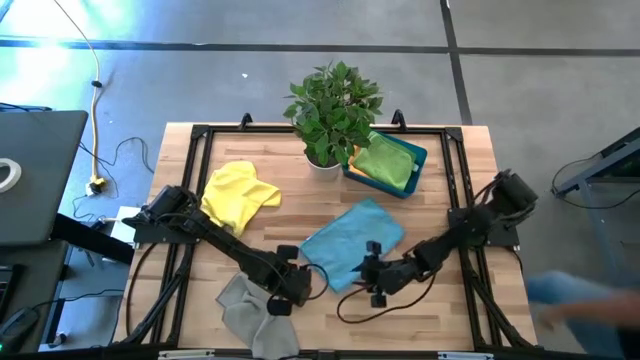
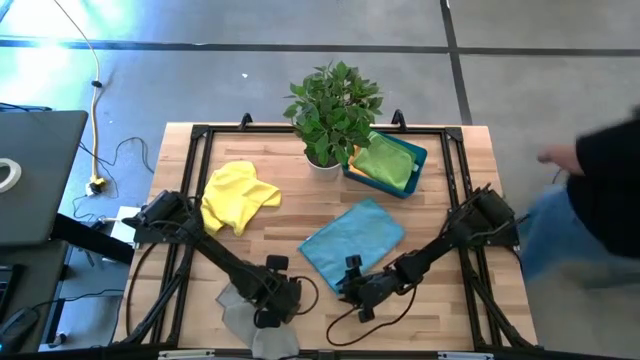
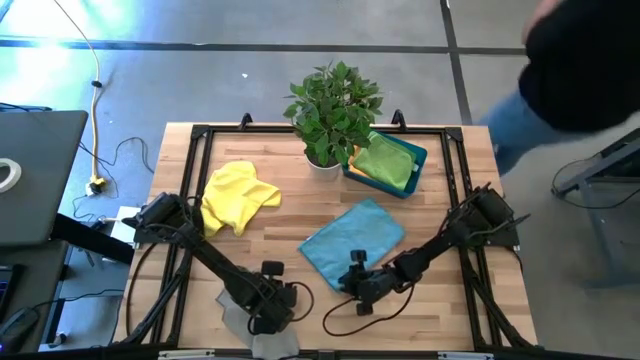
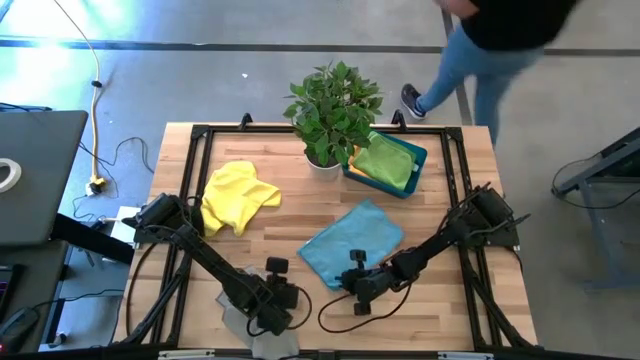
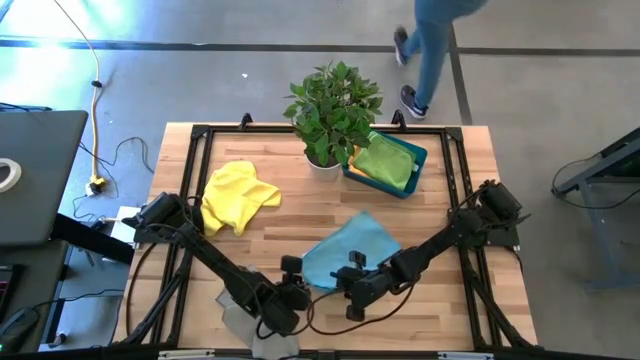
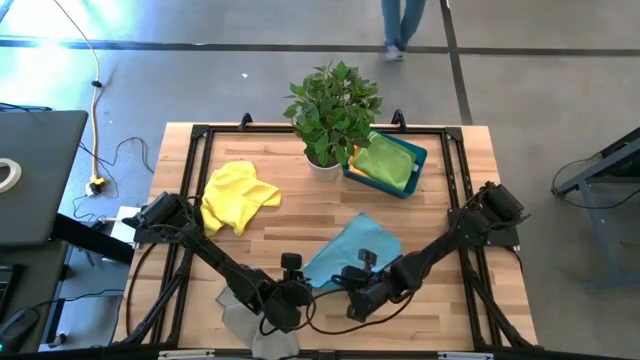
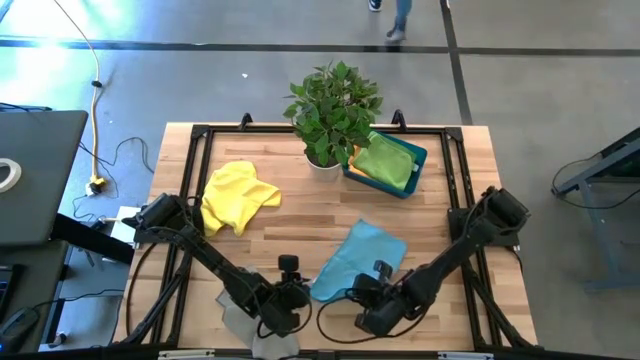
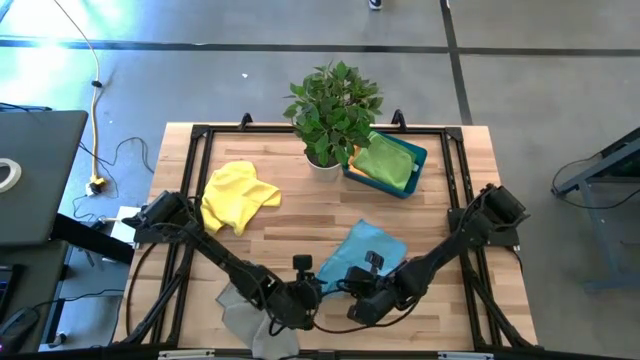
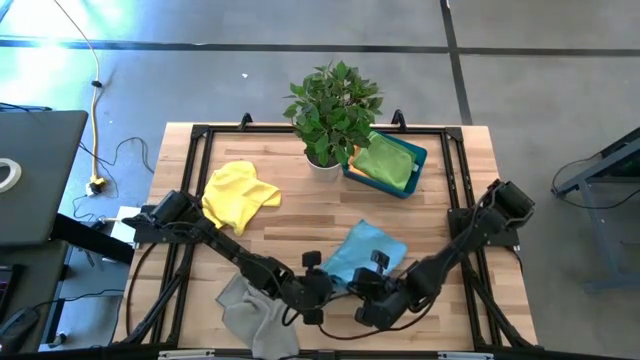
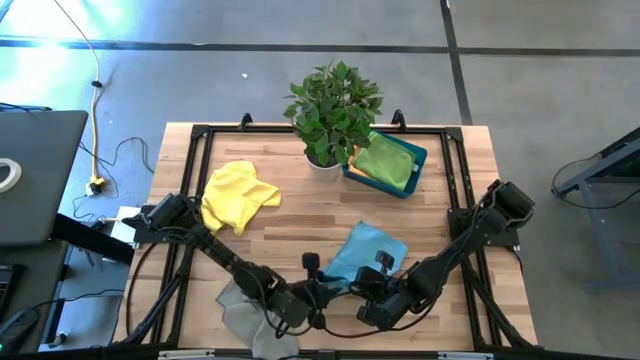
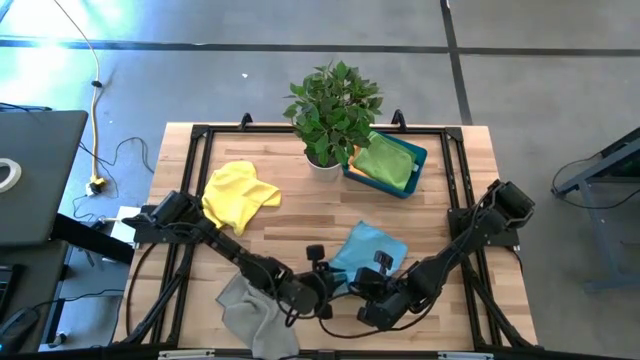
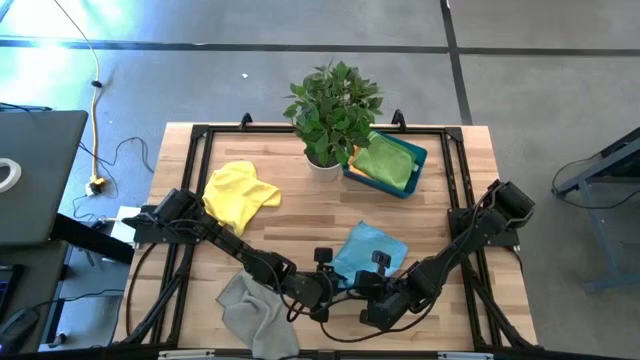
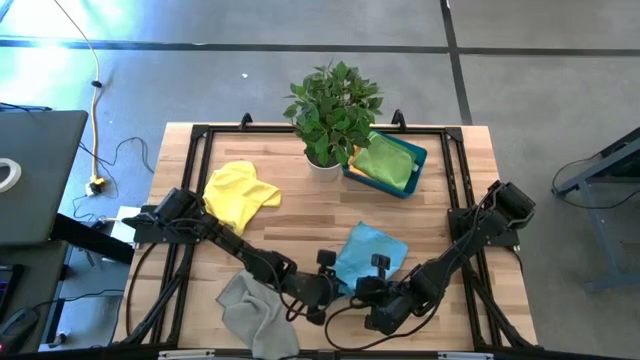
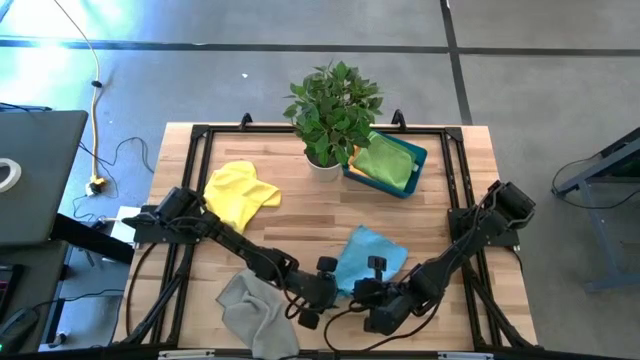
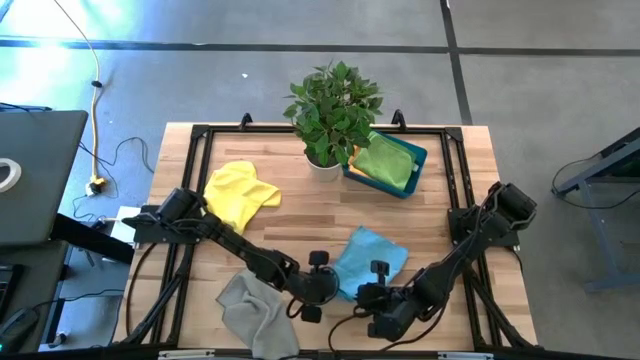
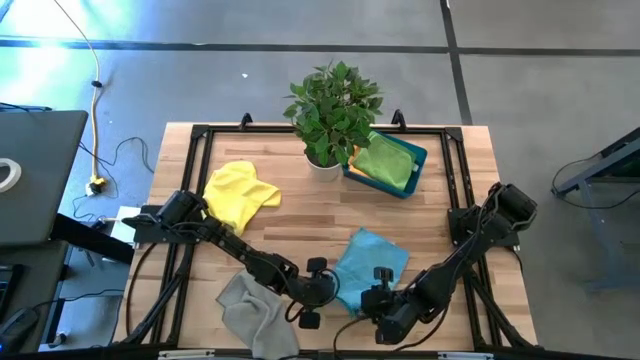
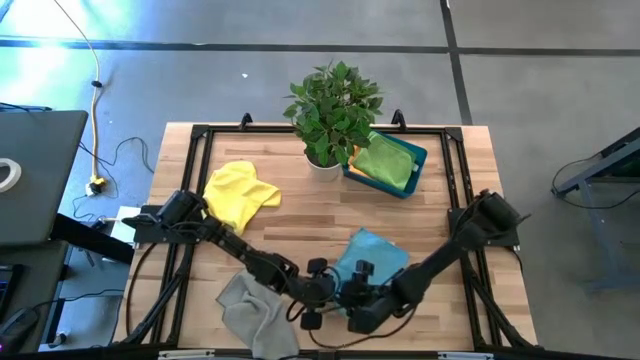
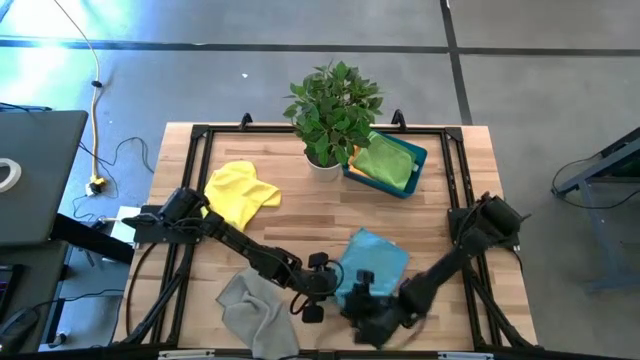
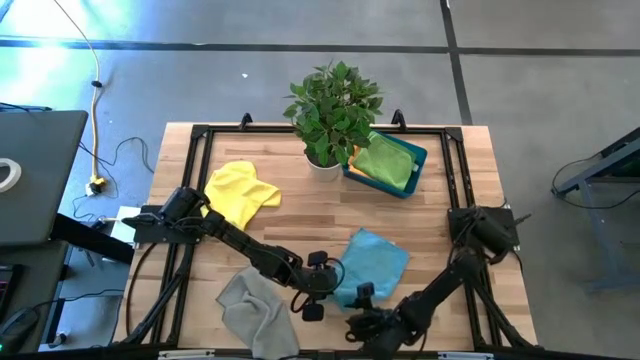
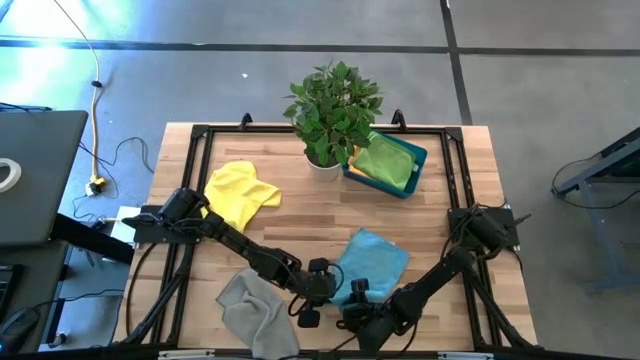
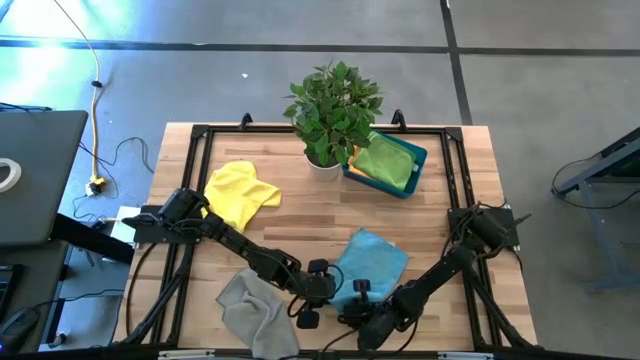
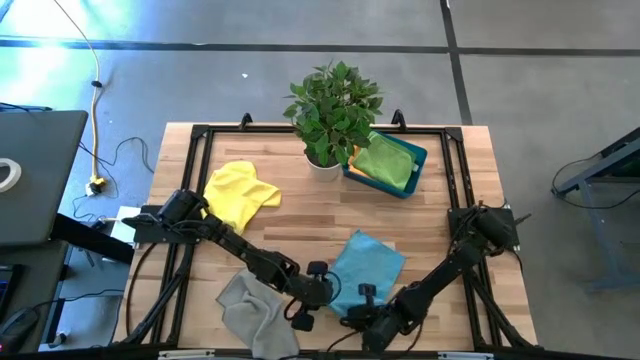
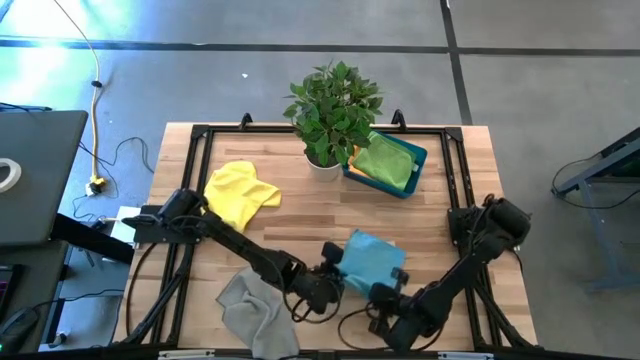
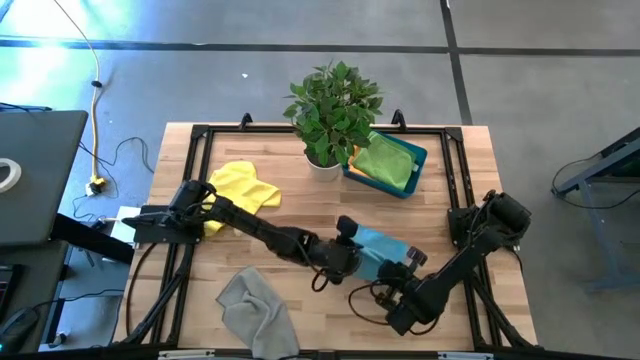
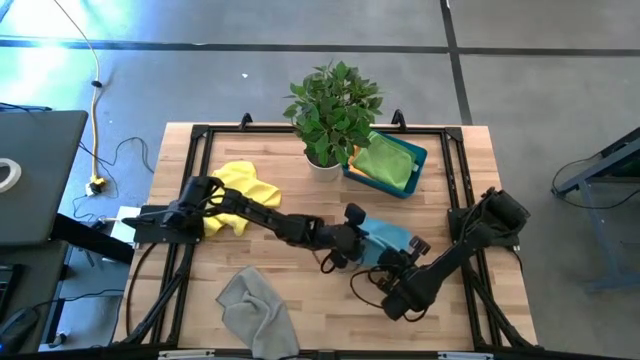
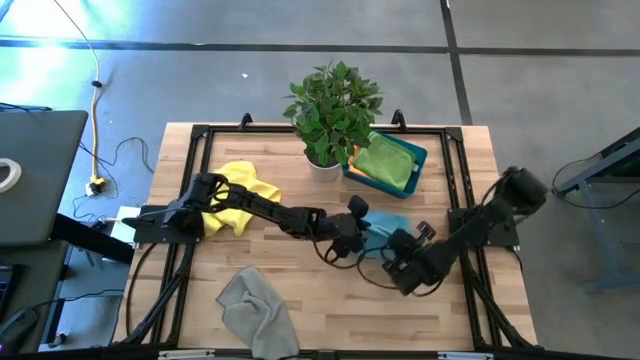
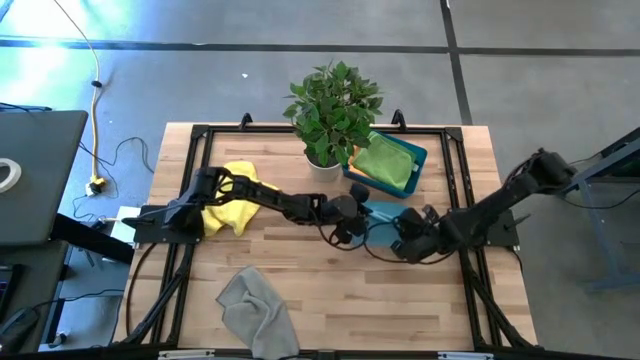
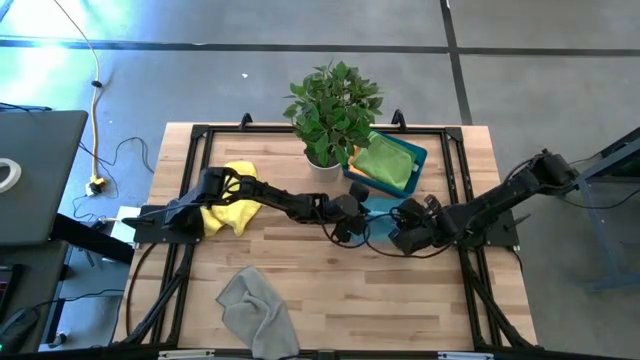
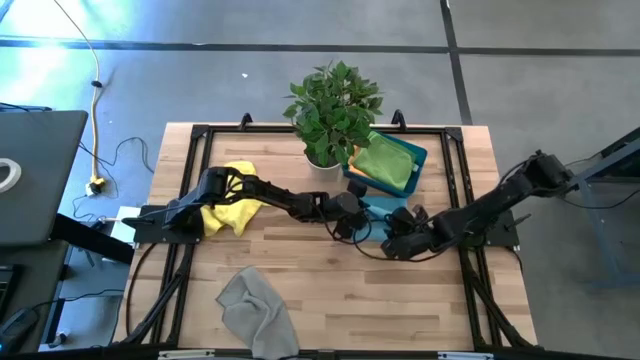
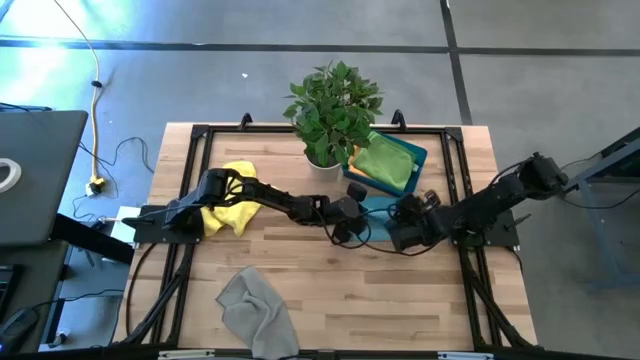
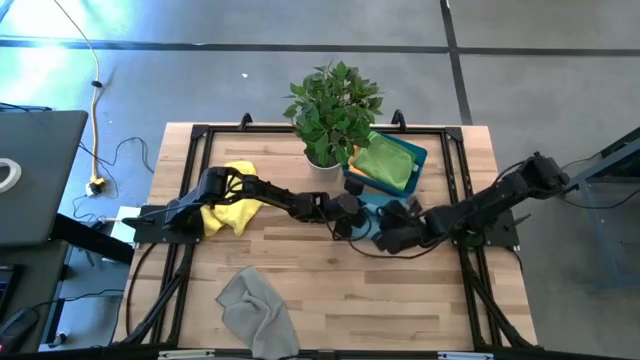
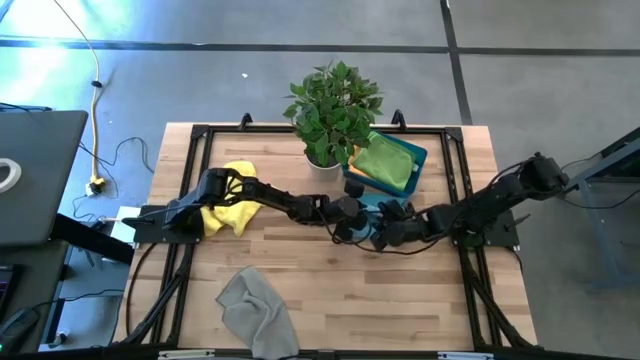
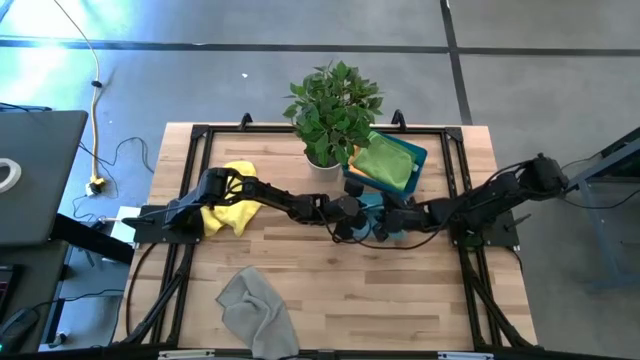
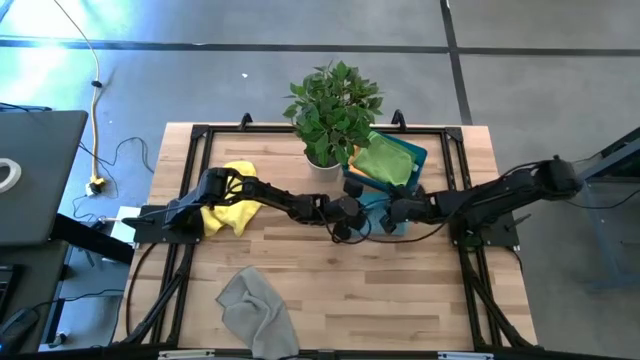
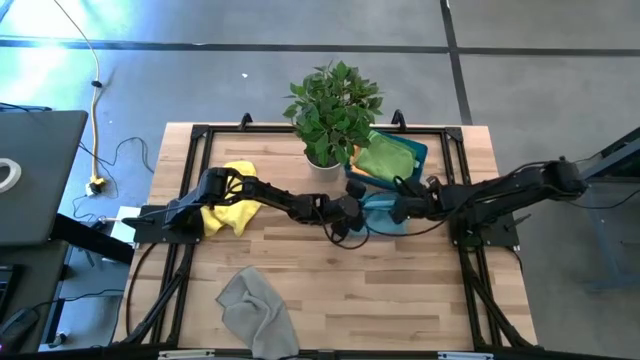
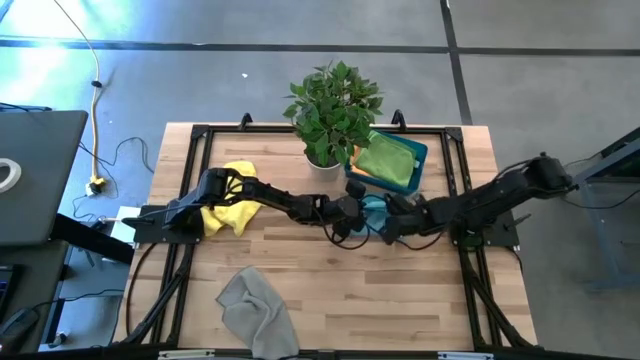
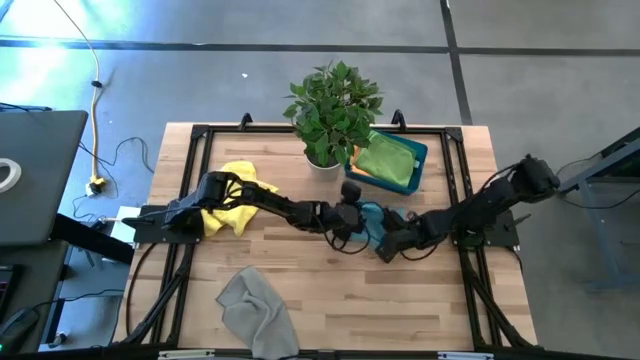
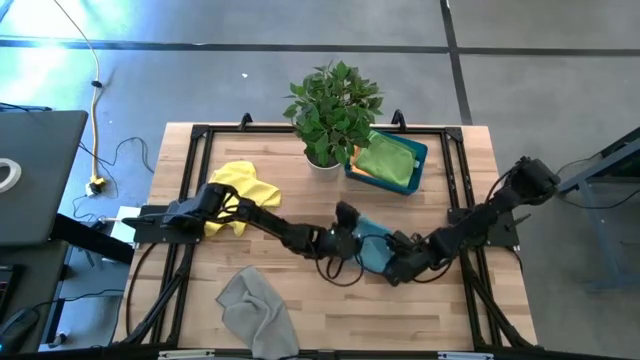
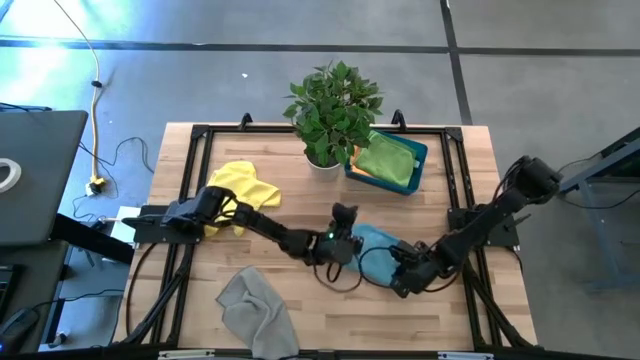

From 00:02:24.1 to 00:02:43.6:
Task: Fold microfiber towels
Fold the blue towel
